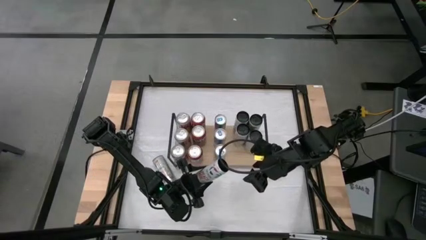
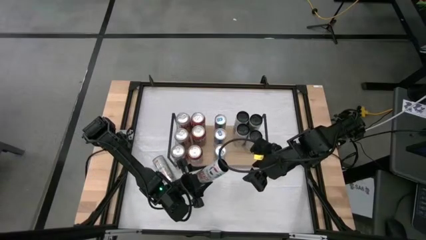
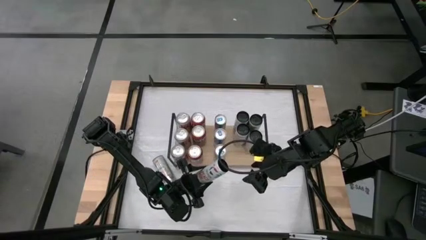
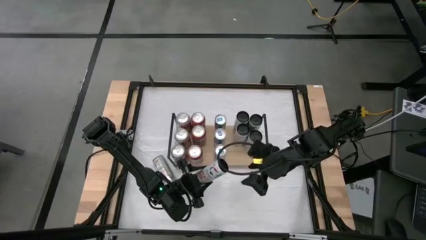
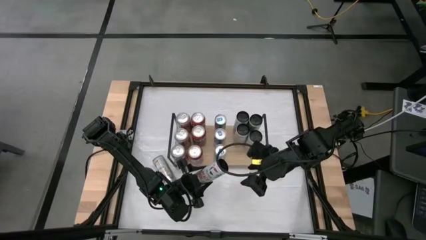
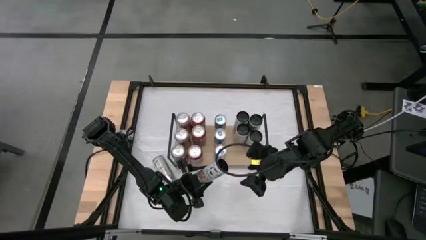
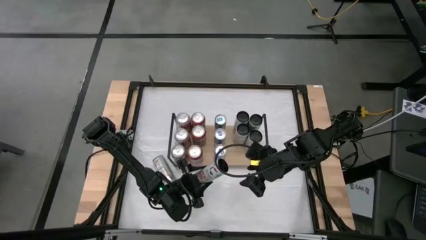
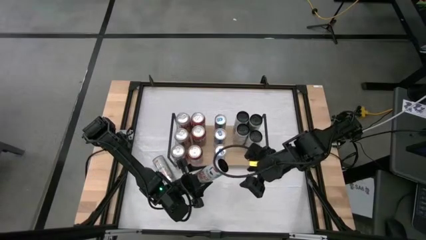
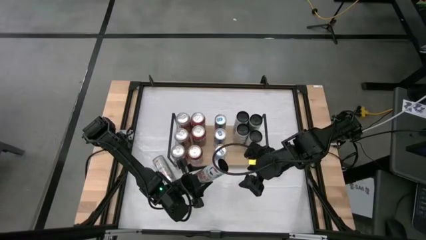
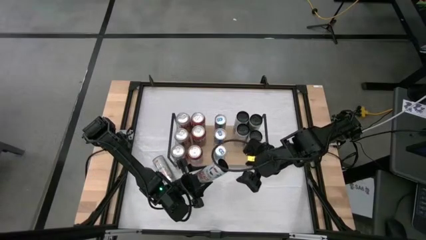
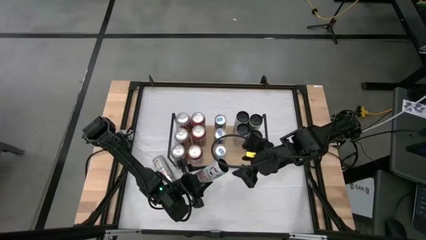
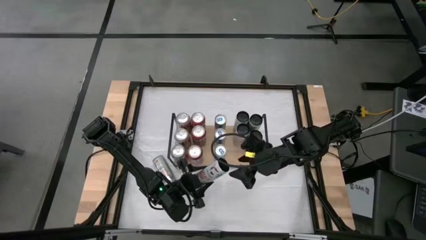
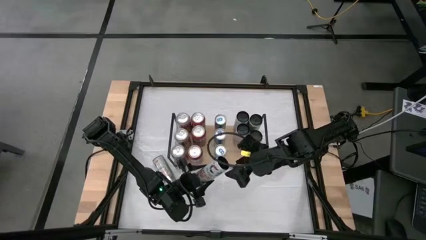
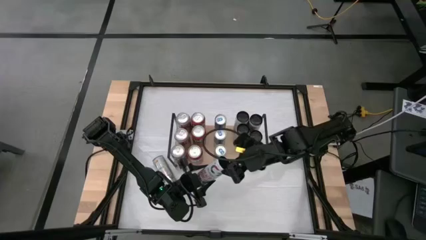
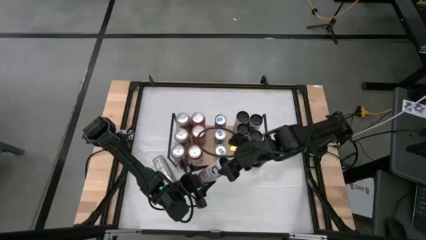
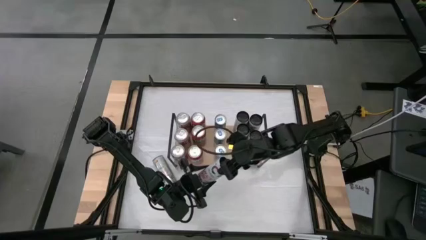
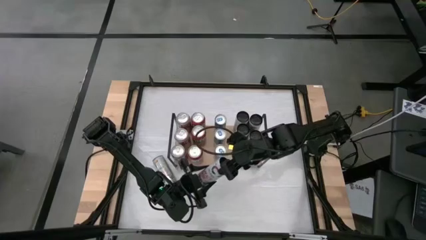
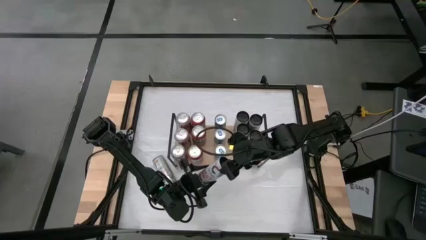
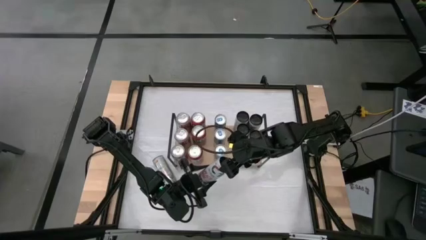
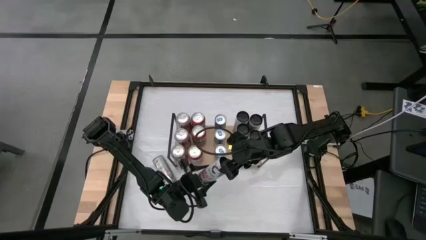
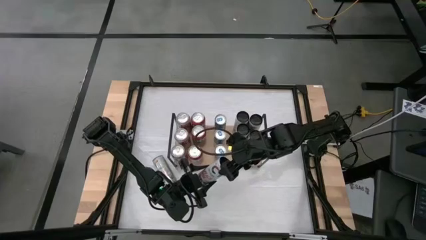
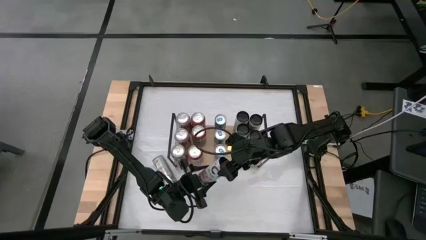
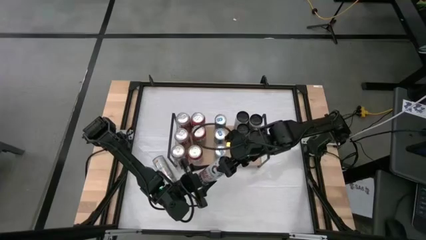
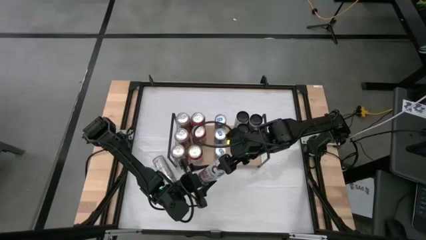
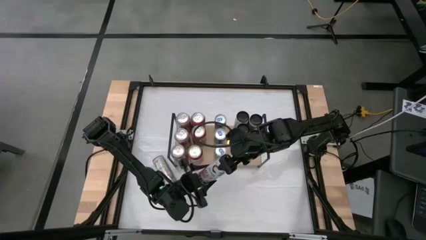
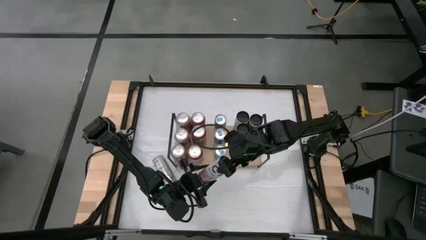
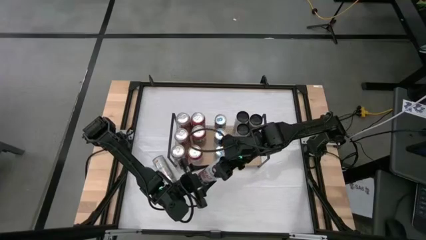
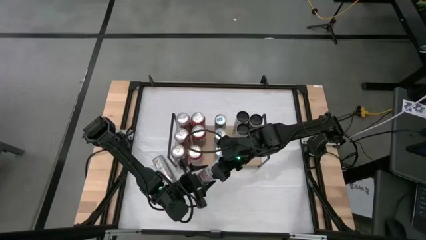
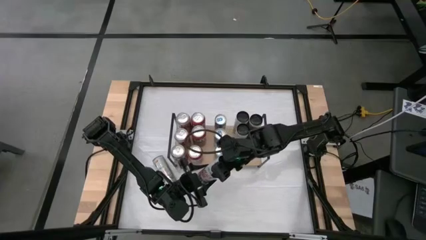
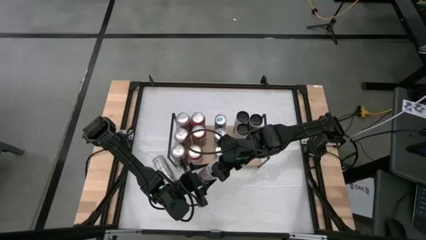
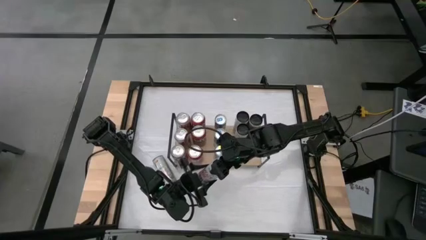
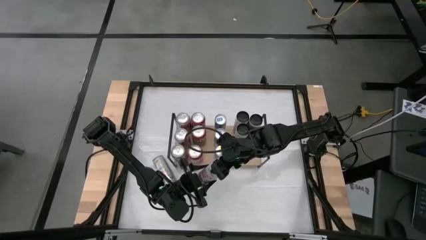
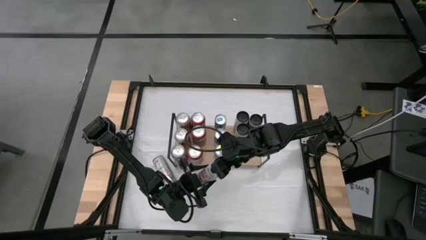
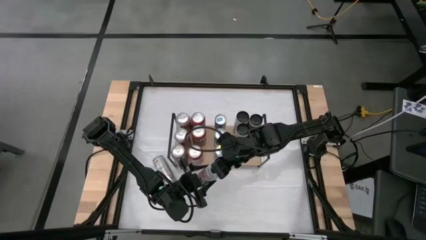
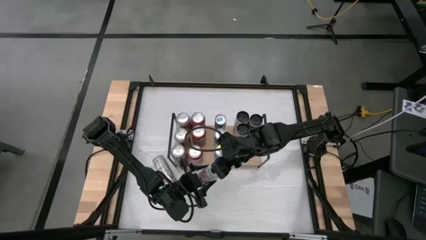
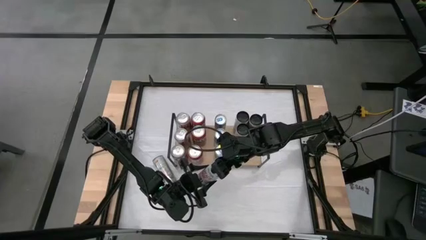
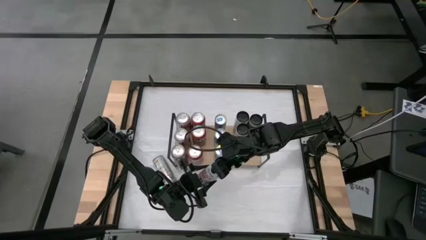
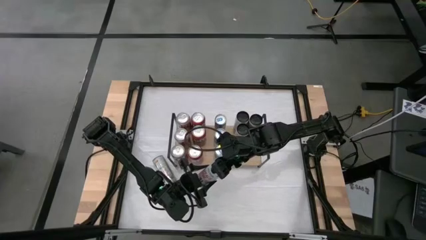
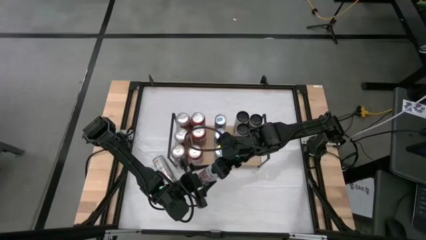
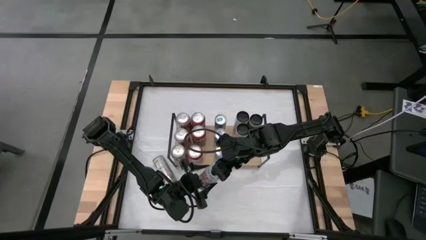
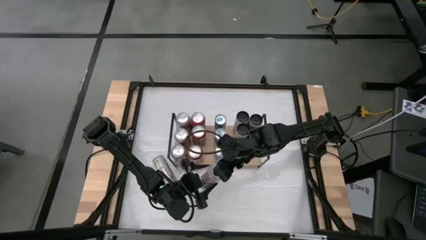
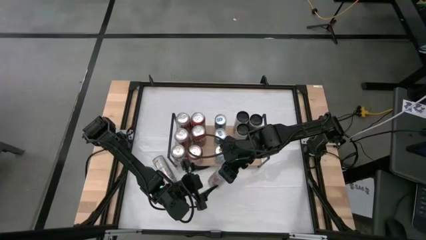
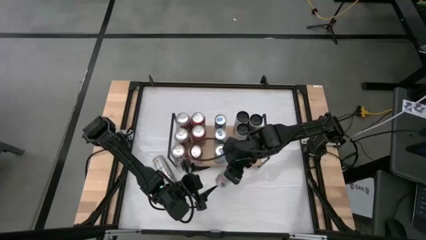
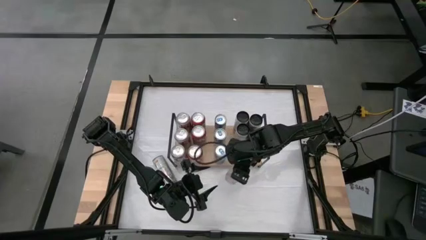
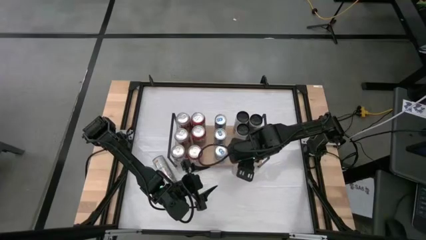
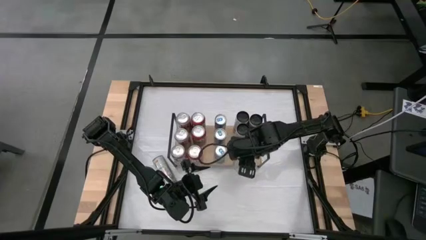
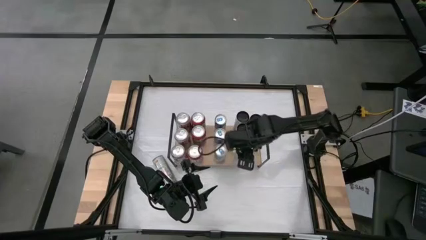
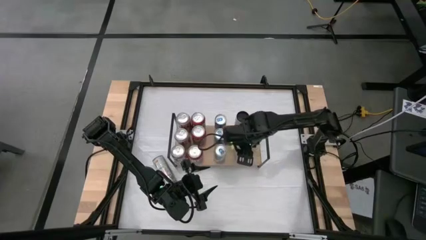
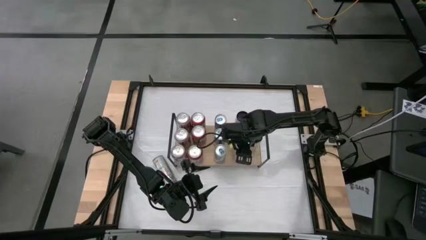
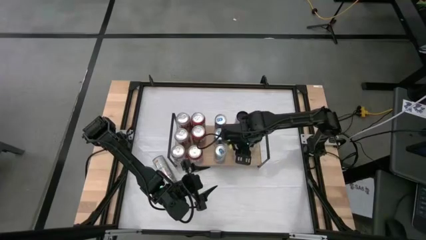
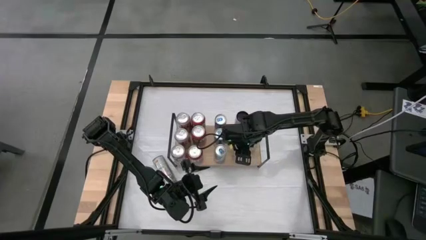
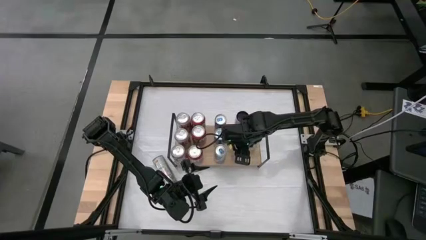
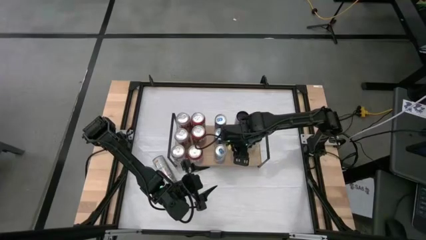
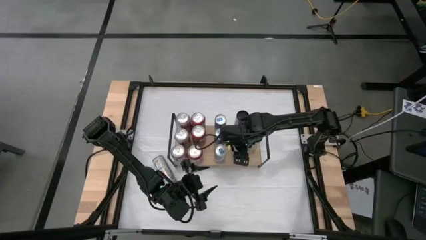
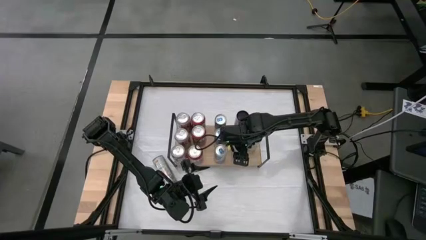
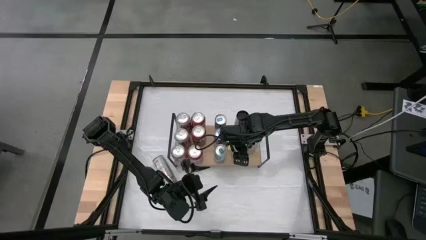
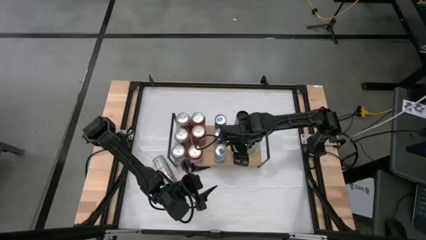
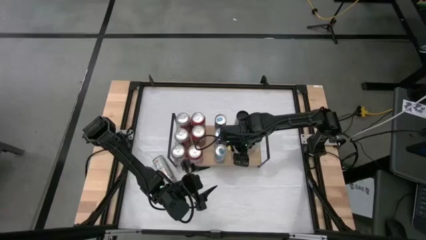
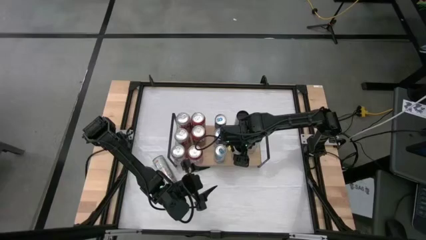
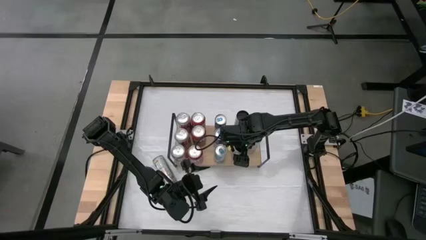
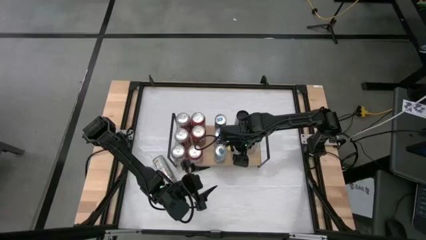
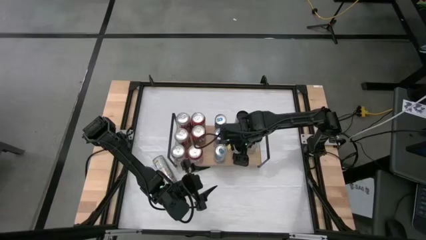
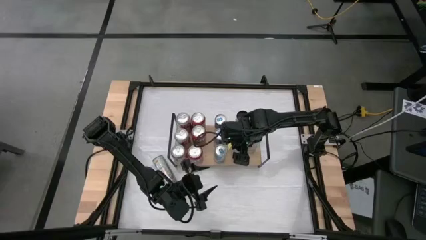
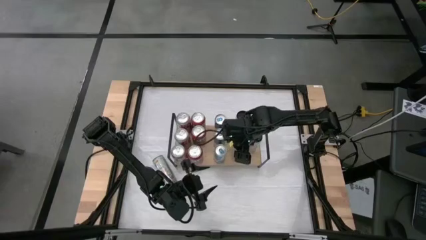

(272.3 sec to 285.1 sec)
Task: Place canned beverage on shelf
Put the white-pink soda can on the shelf aligned with the other white-pink soda can
